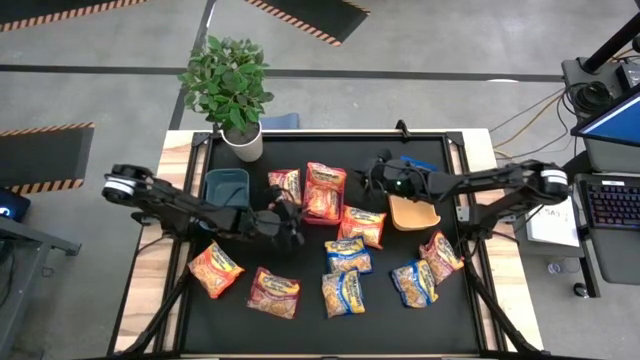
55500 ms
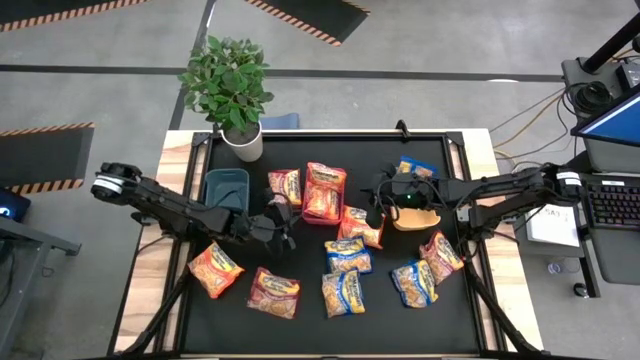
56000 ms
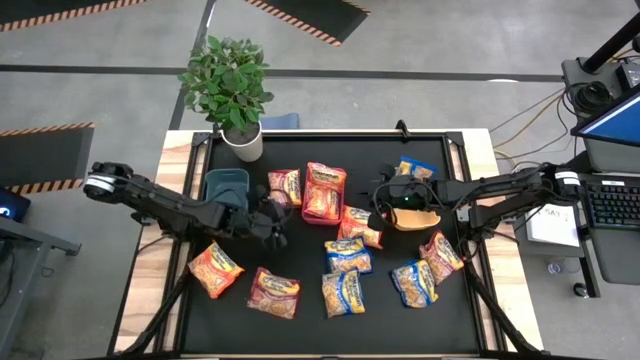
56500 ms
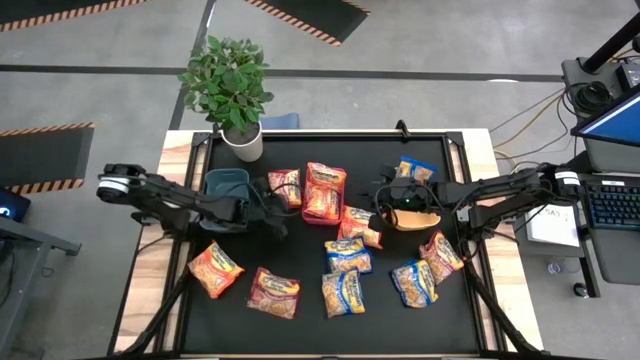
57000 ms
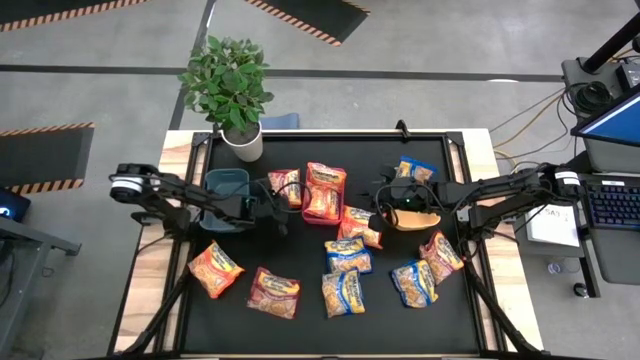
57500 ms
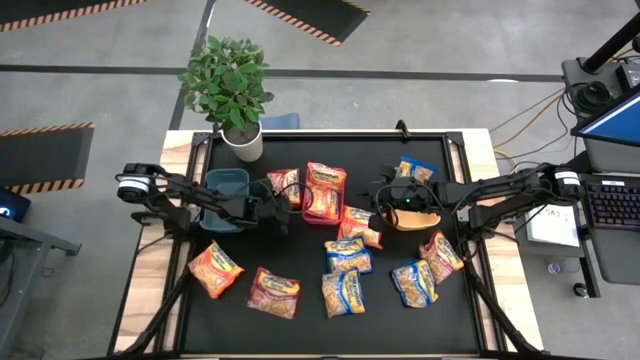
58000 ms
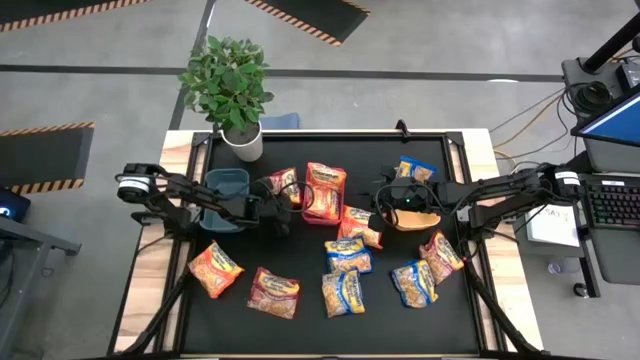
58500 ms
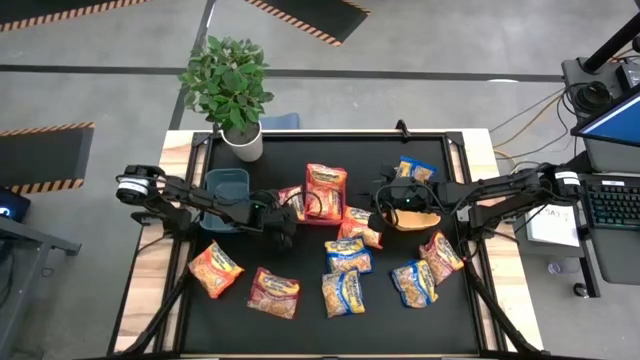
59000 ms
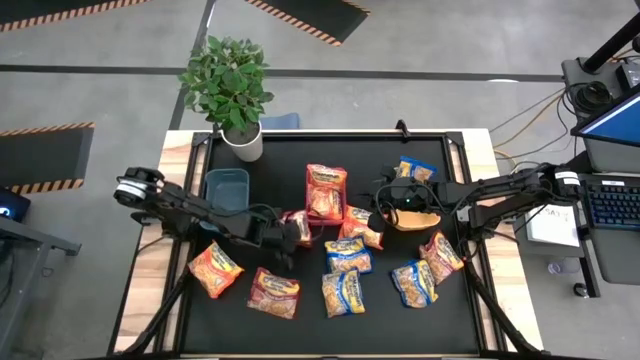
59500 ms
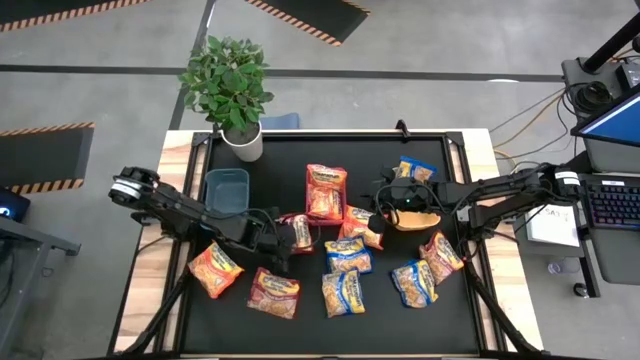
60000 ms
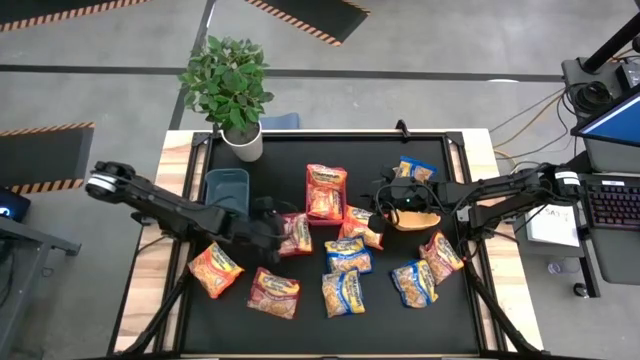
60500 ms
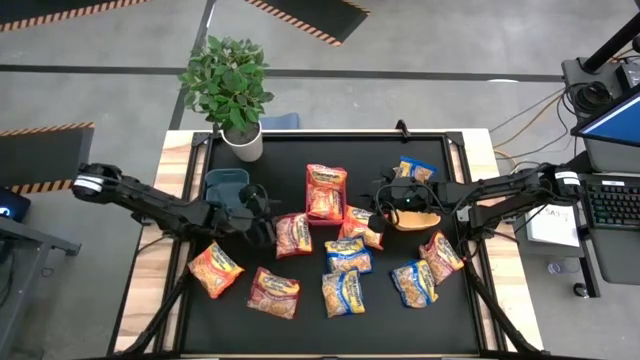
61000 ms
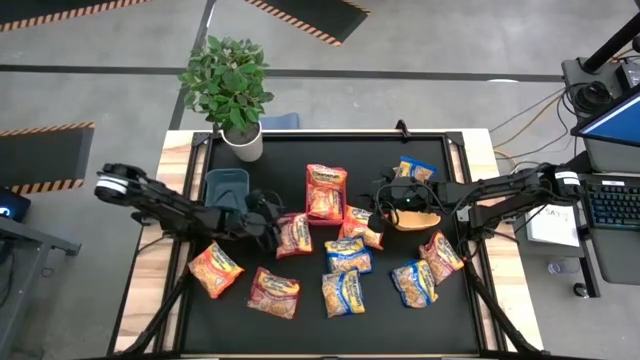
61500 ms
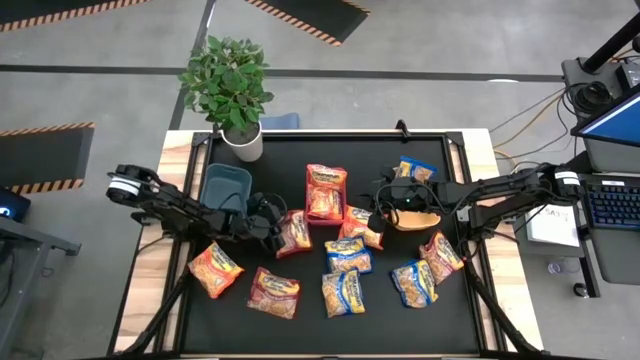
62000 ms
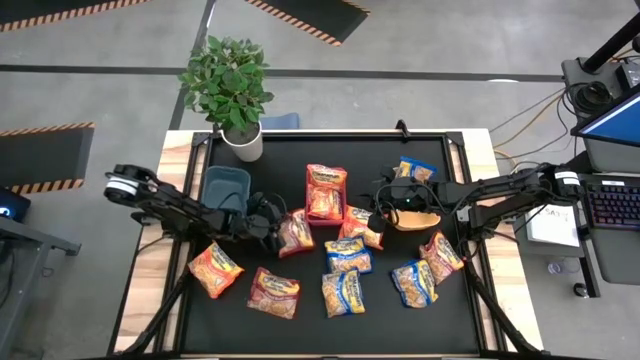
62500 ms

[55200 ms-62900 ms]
Task: Sort Maruchan noodles
Put the red noodle pack into the blue bin

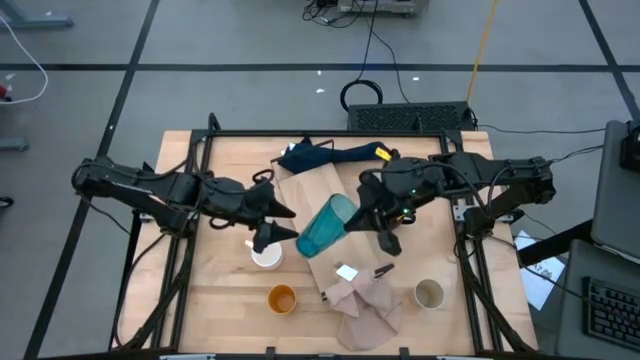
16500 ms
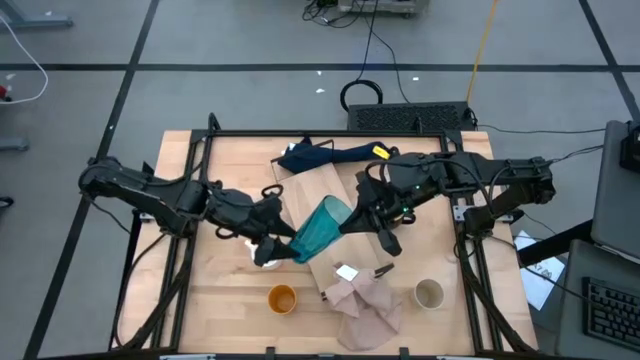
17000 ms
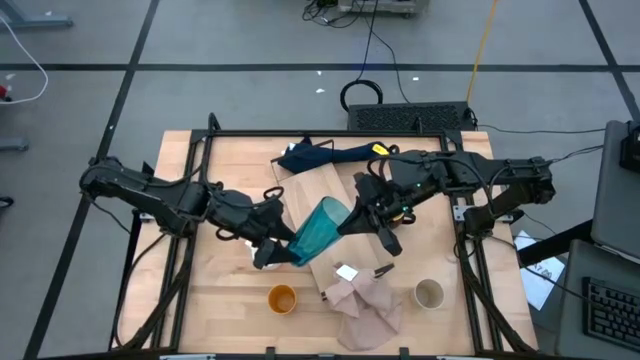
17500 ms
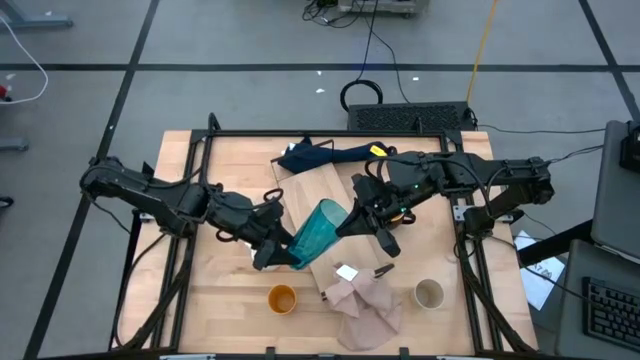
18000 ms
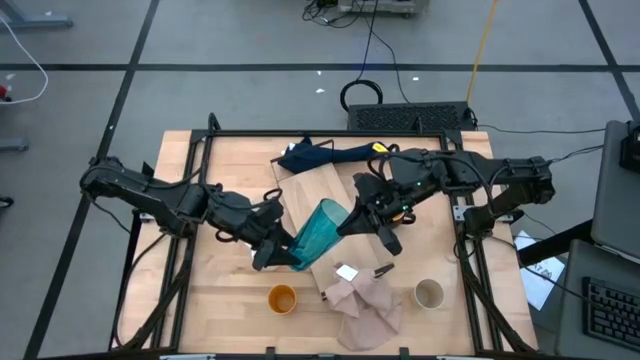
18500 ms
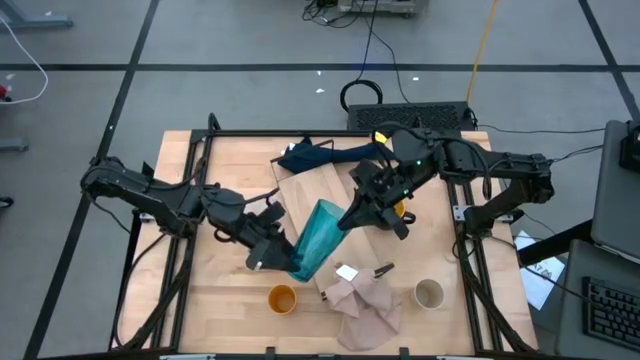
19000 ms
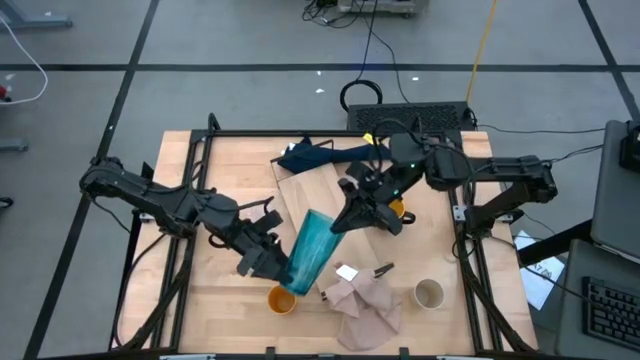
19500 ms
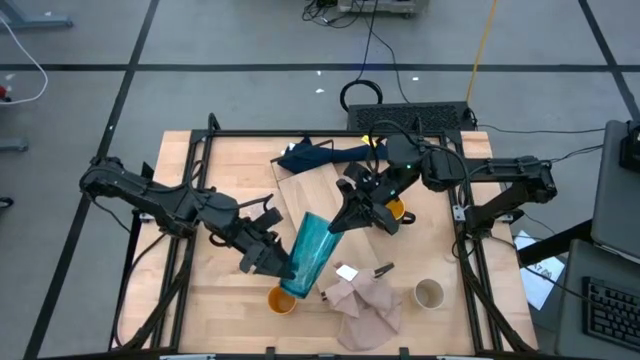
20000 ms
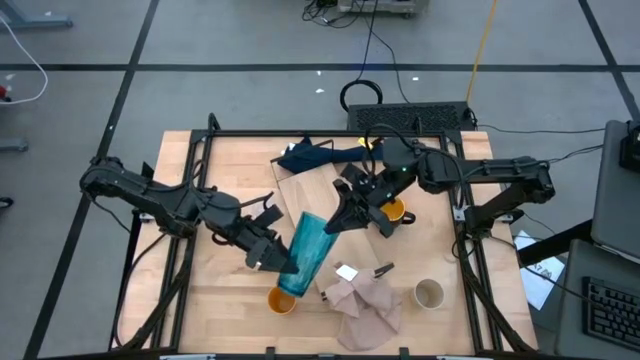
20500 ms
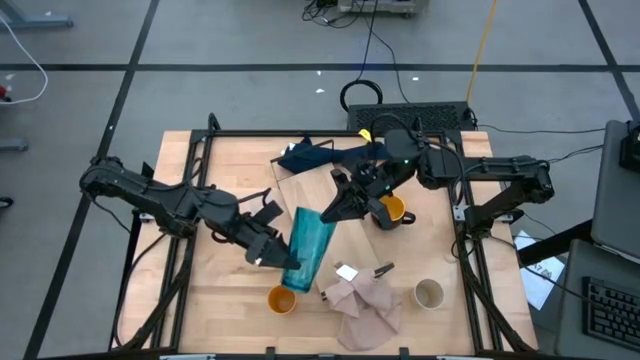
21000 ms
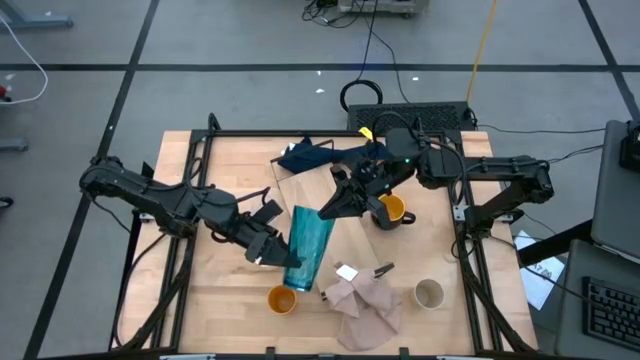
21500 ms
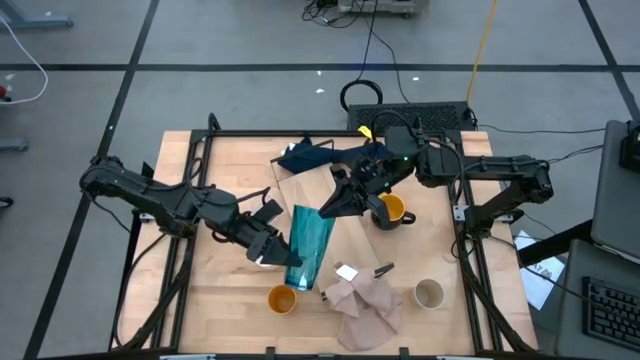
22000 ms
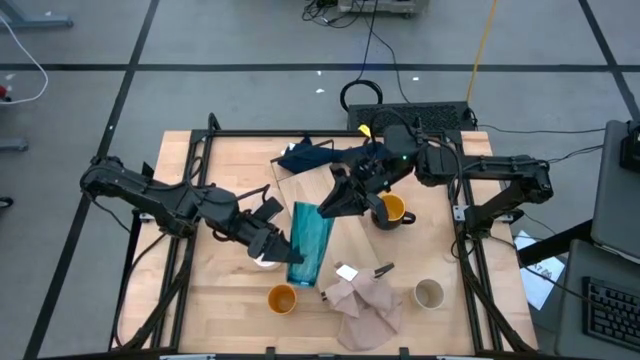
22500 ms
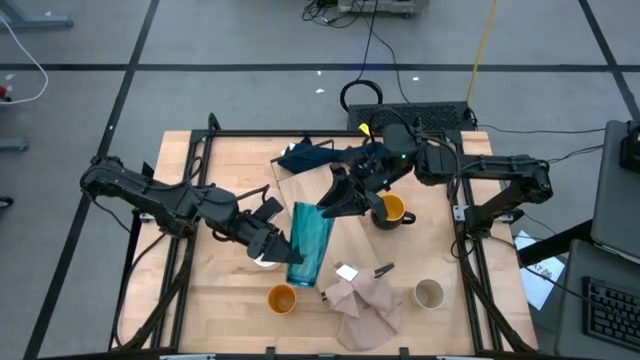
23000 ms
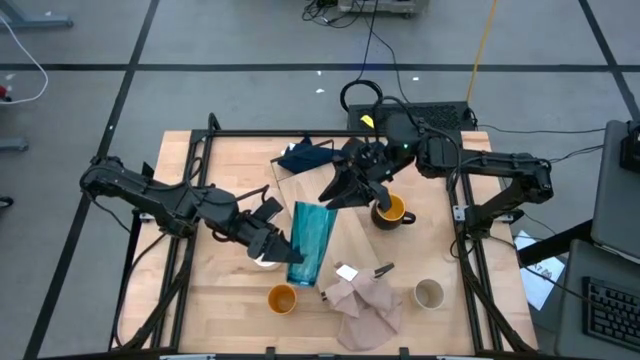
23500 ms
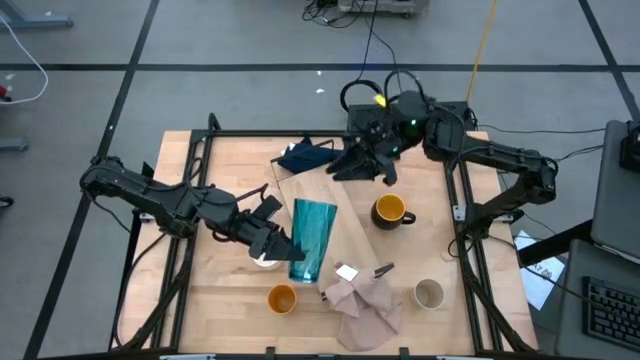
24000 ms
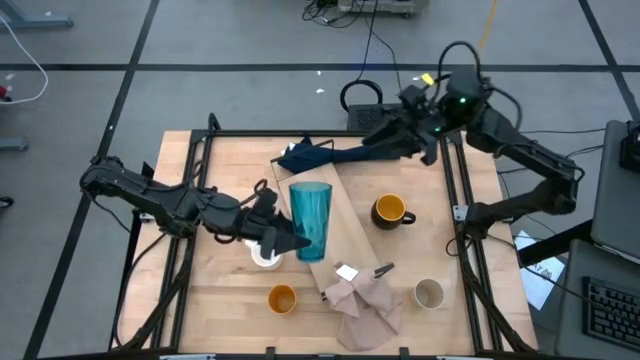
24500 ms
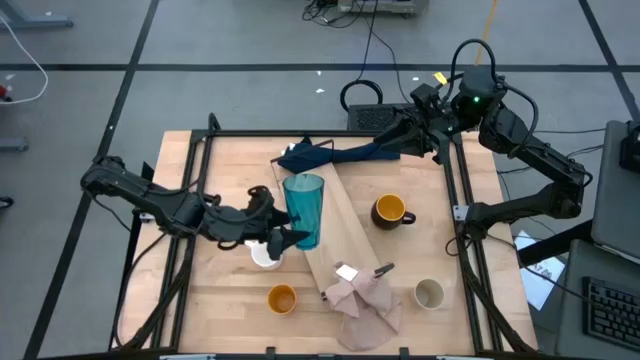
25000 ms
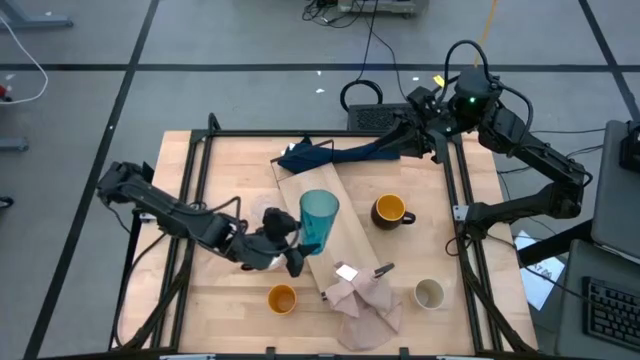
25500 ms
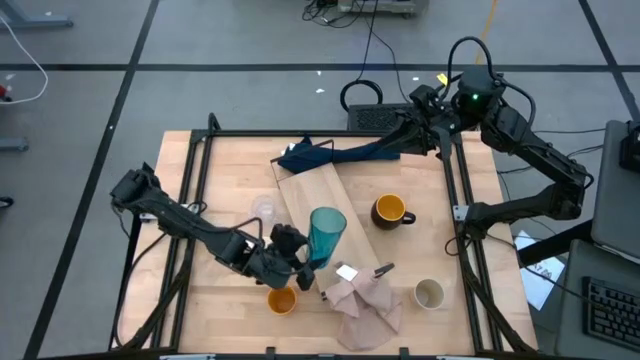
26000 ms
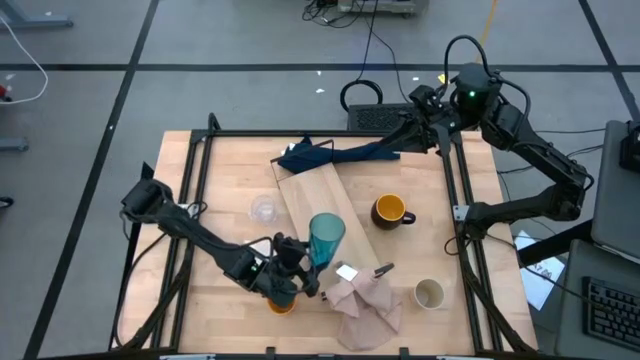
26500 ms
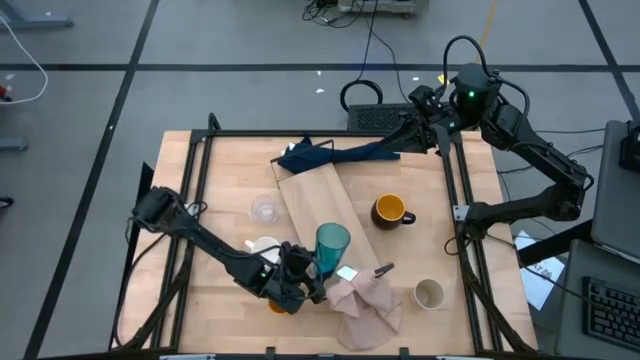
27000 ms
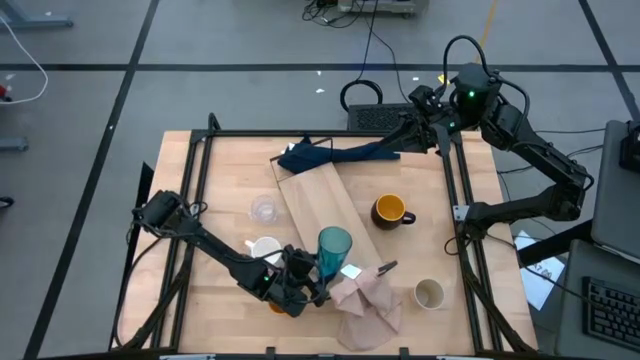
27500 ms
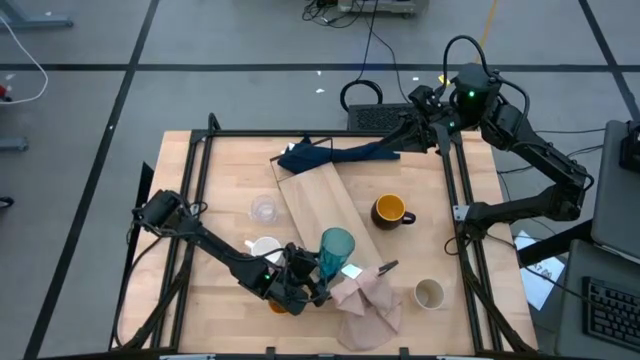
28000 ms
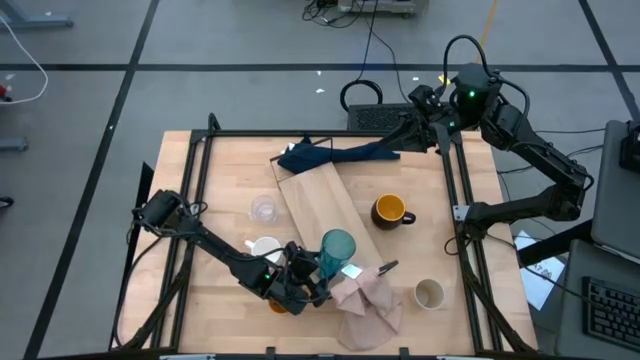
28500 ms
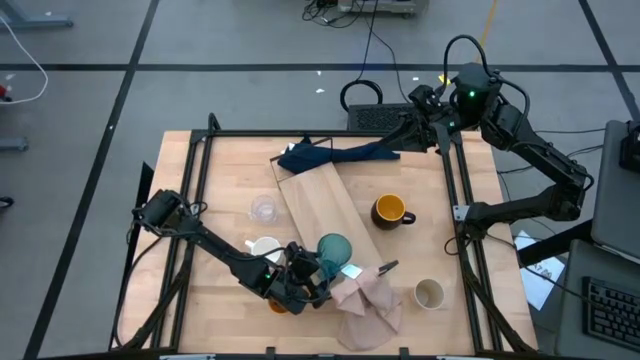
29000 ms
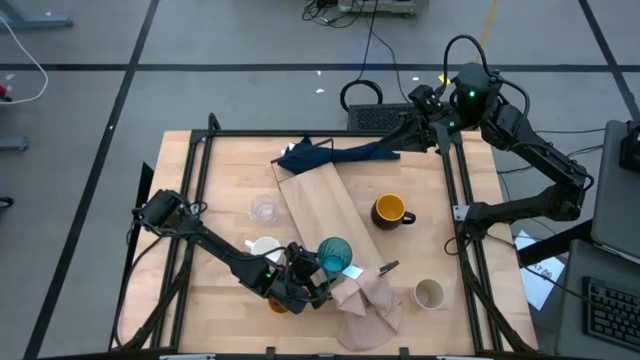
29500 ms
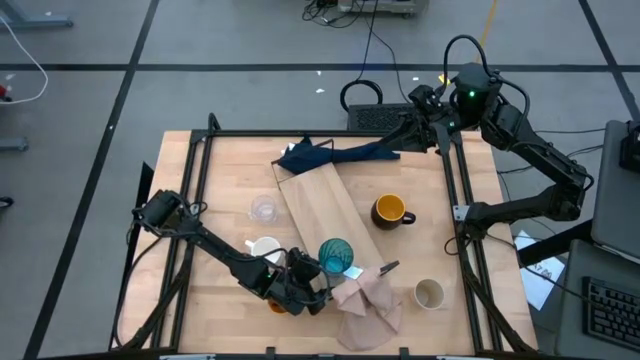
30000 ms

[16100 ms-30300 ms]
Task: Stack small to large cups/mugs on shelf
Put the blue cup on the shelf
